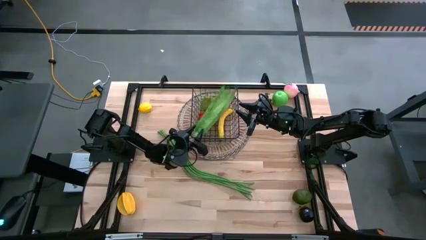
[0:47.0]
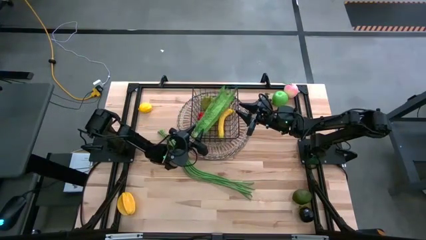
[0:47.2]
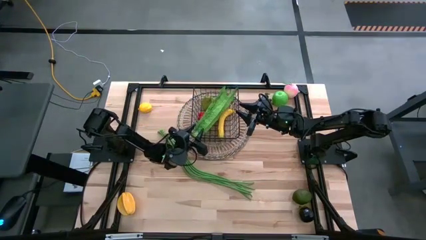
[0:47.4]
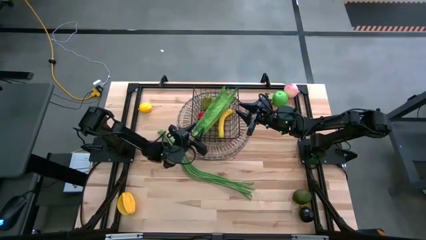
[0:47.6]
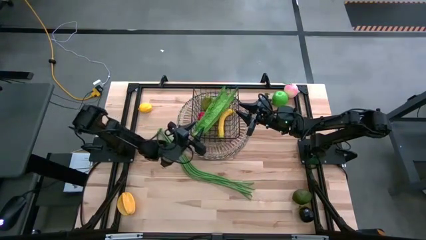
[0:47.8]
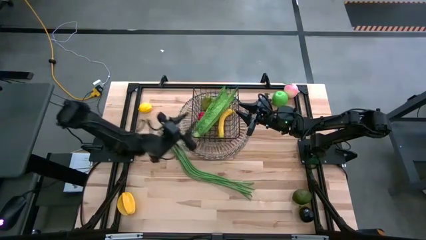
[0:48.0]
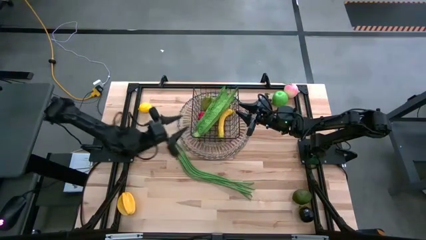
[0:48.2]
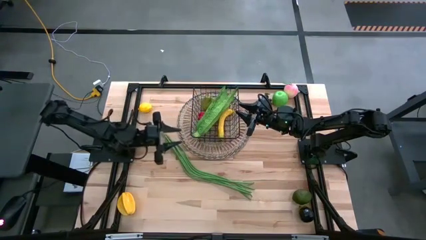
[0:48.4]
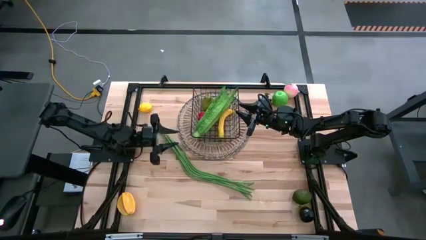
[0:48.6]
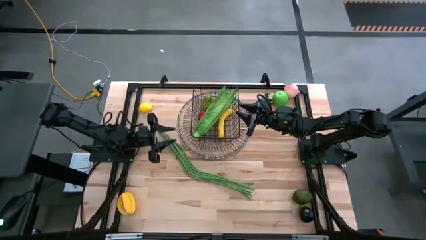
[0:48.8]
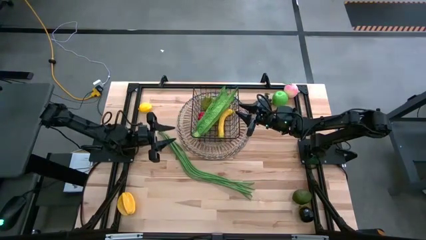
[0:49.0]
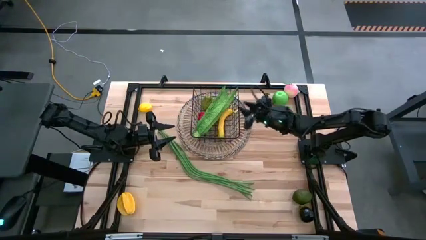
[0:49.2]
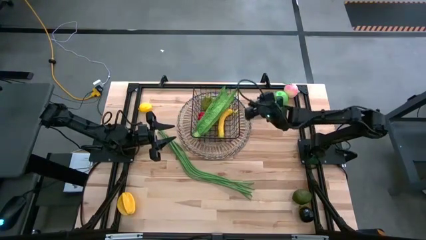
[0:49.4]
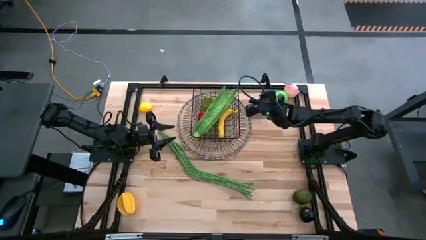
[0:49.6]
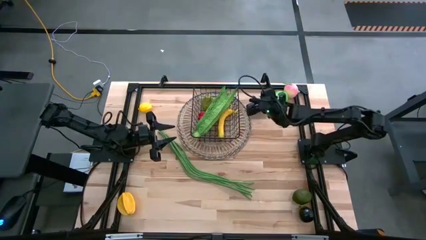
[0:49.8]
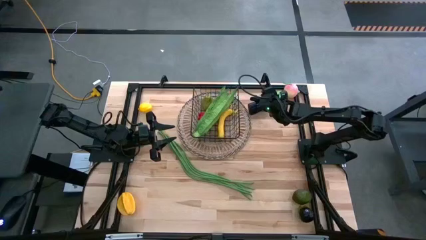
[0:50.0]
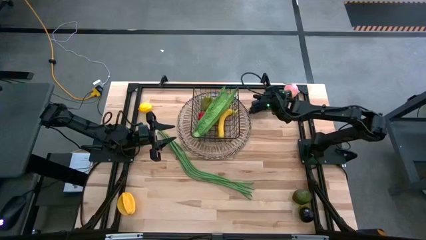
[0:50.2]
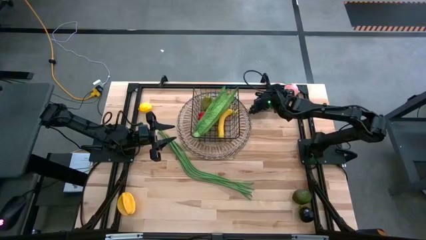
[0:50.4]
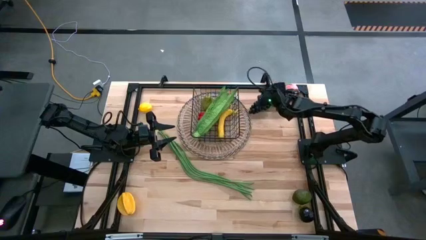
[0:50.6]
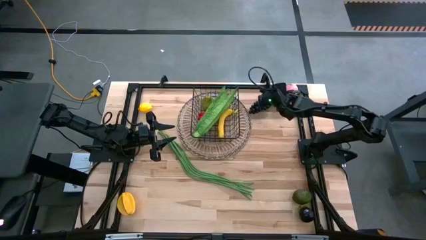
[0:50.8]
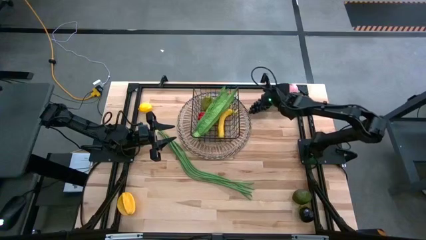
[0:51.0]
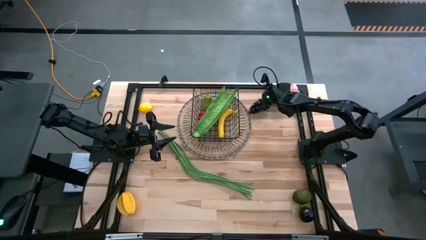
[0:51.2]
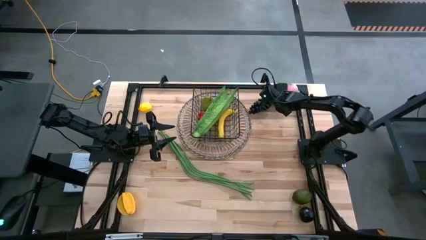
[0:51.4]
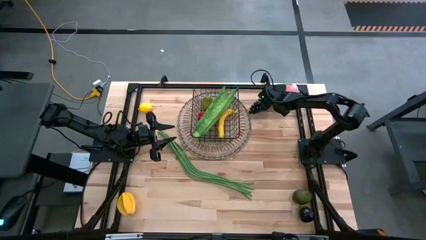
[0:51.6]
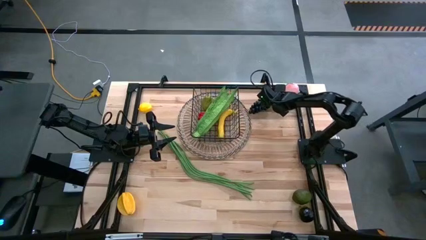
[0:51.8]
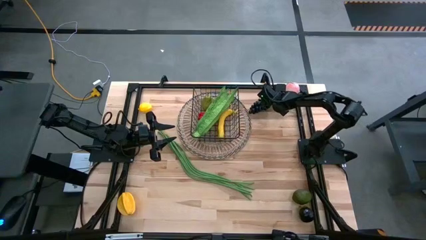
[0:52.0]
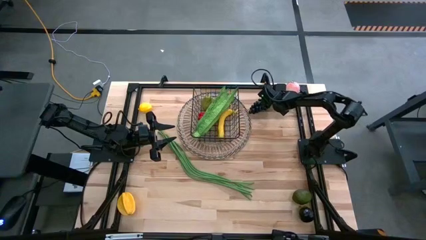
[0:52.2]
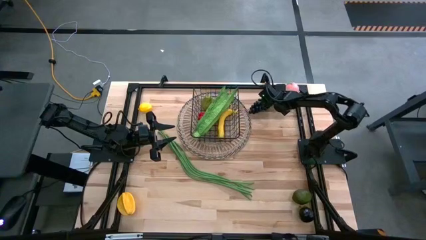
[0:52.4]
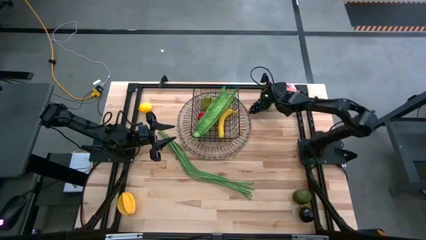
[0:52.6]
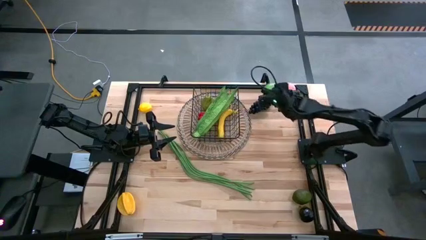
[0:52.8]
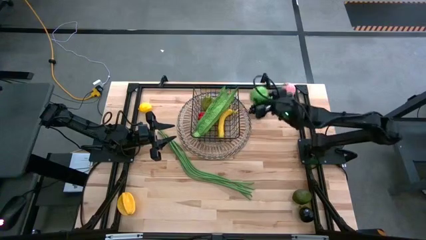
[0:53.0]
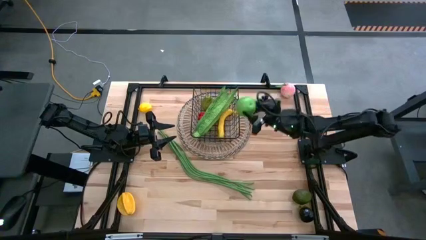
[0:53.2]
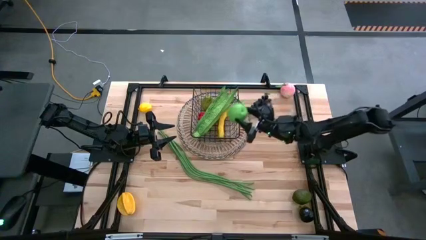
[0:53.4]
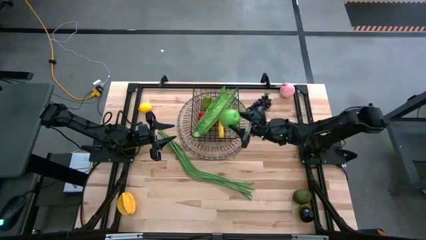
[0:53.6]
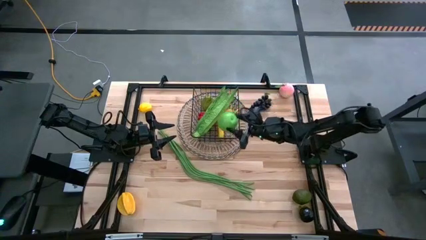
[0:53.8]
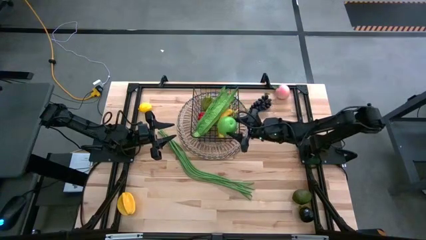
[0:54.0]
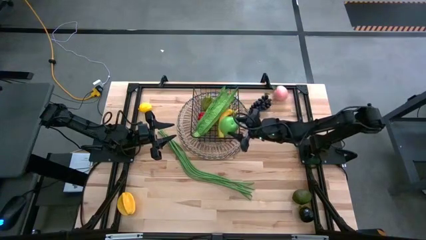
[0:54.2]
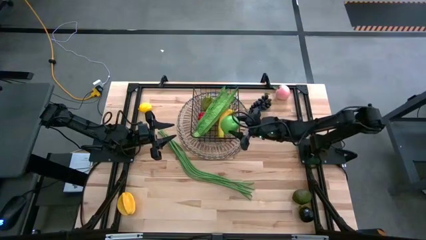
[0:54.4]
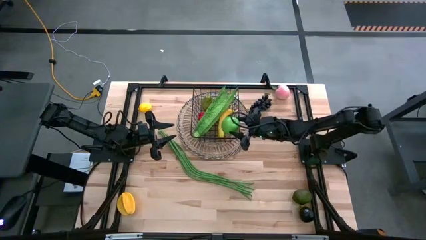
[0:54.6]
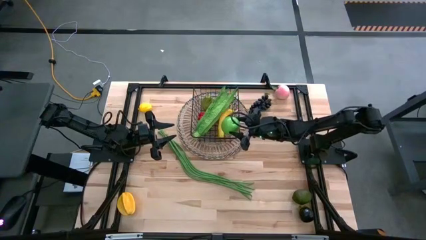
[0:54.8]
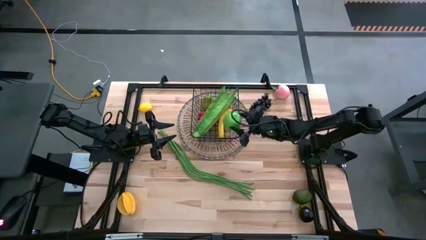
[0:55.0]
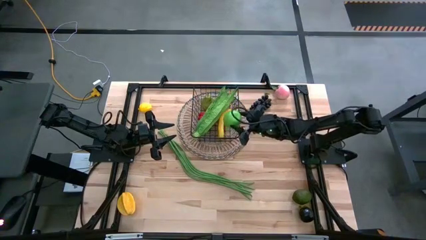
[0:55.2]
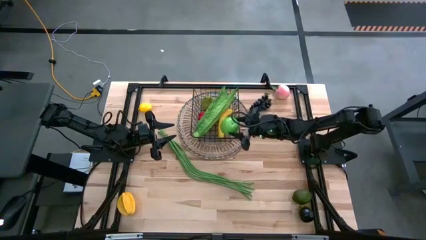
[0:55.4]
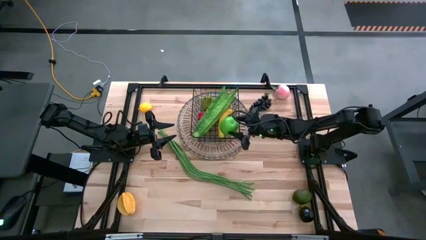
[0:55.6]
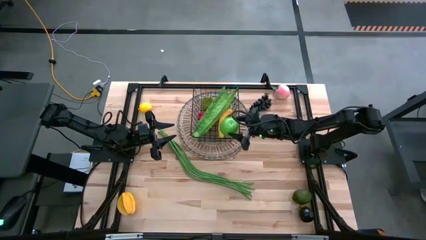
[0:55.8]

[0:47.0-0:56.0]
Task: Build produce basket
Put the green apple into the black mesh basket

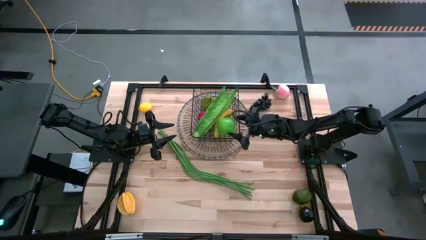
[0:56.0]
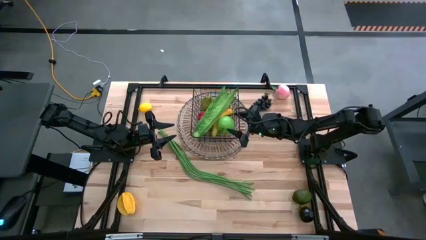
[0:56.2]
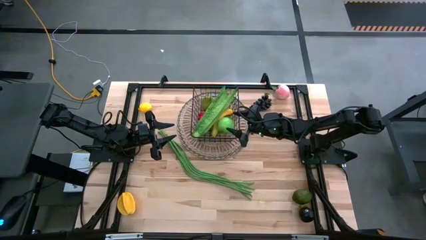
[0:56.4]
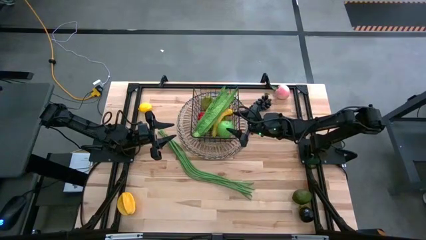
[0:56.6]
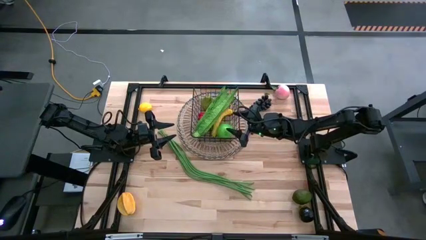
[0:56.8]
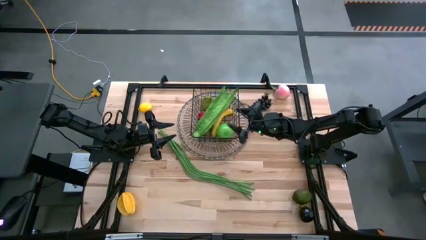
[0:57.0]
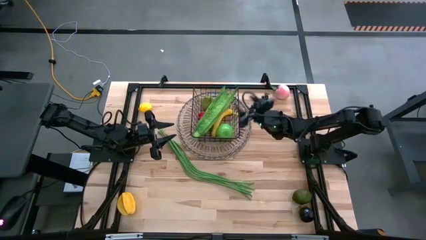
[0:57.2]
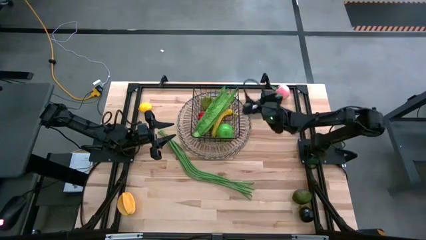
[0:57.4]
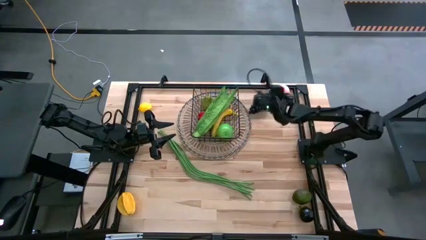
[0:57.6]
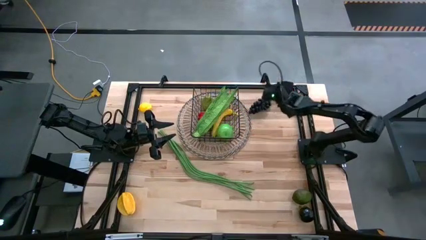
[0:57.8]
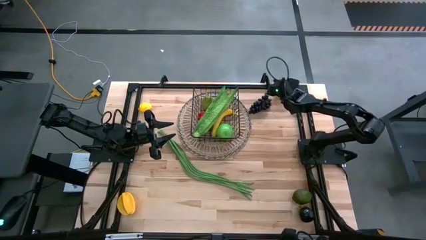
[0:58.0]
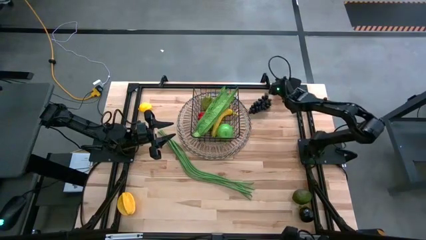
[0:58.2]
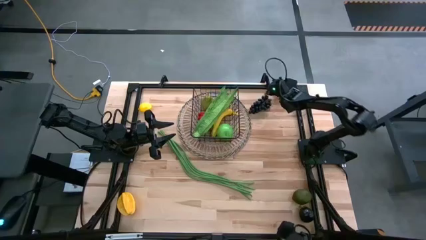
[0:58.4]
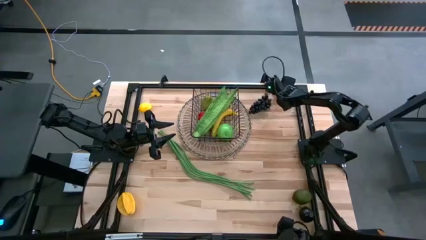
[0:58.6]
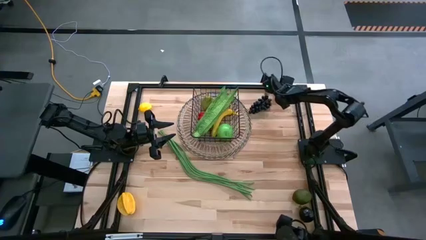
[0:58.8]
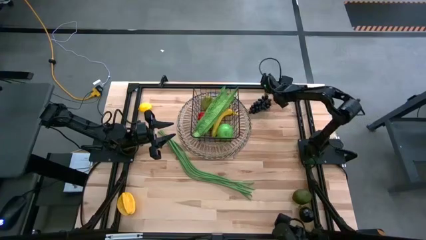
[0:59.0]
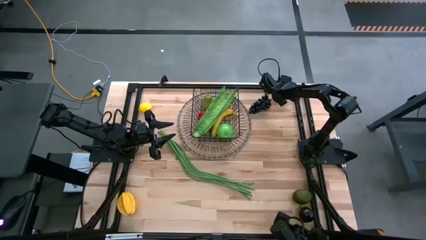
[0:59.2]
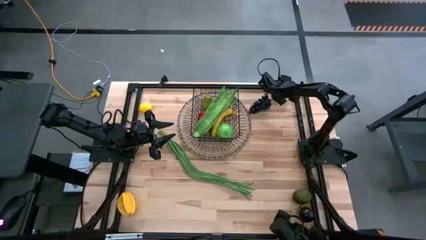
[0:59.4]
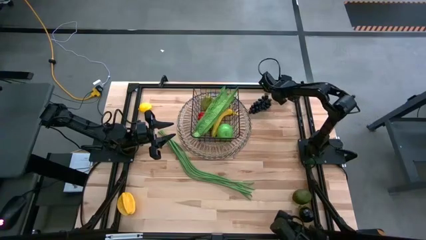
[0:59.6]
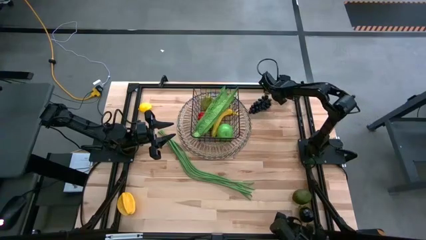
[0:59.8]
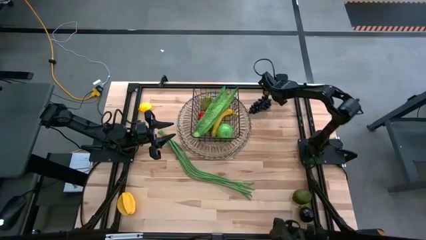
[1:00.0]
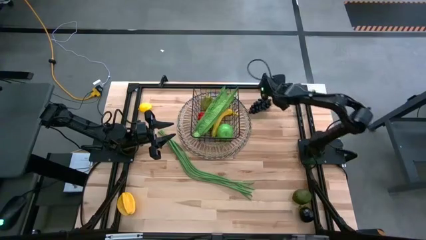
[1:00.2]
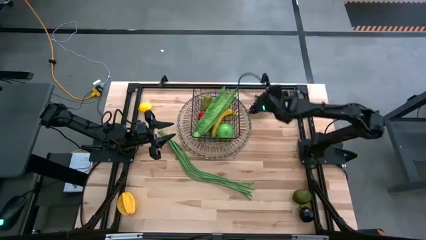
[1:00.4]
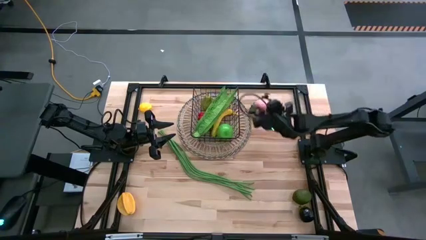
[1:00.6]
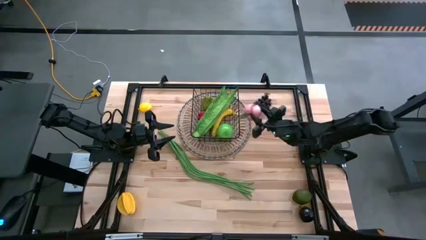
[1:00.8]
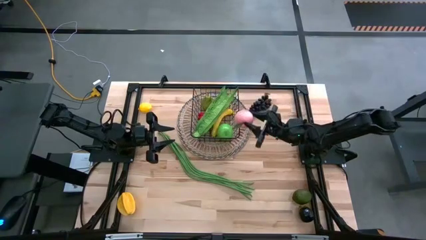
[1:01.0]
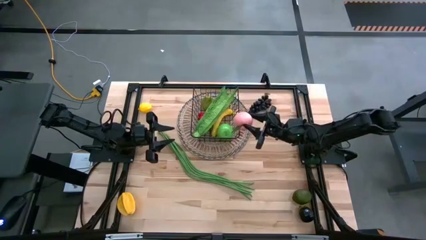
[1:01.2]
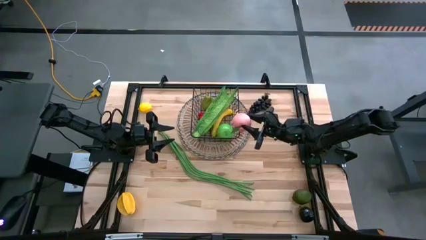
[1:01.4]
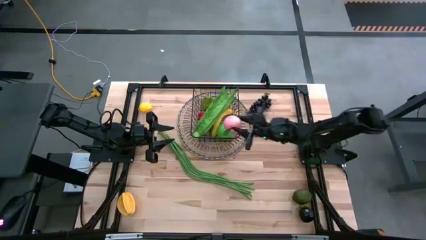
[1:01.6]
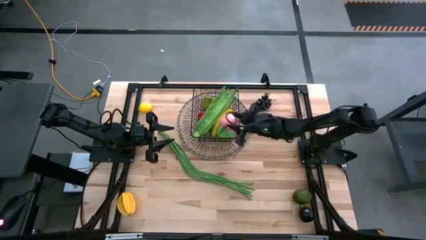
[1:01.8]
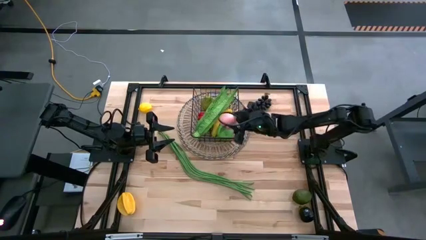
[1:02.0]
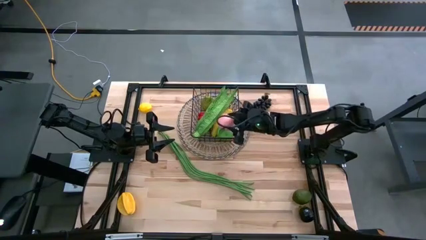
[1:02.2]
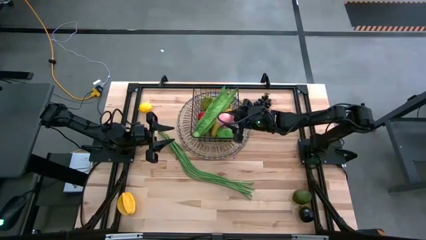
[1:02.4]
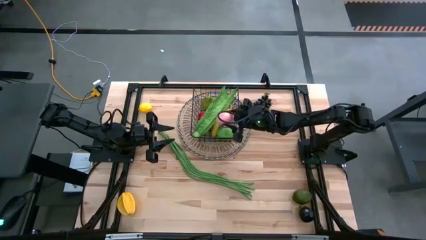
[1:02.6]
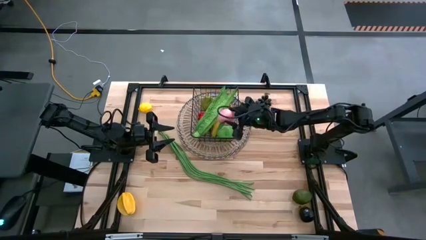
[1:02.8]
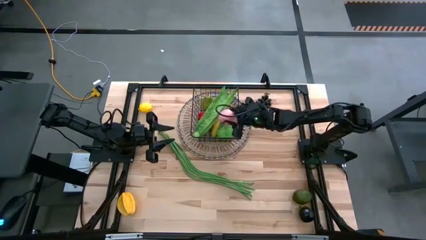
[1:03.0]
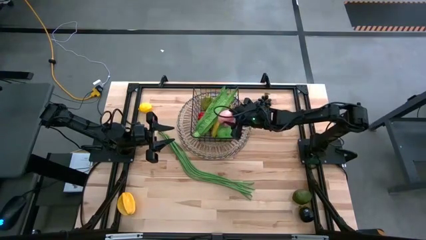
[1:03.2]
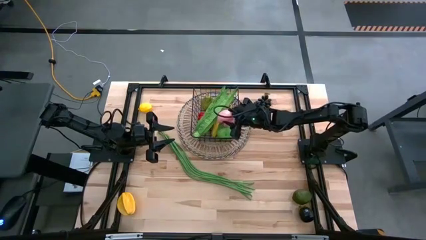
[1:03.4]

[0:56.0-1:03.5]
Put the pink peach into the black mesh basket
